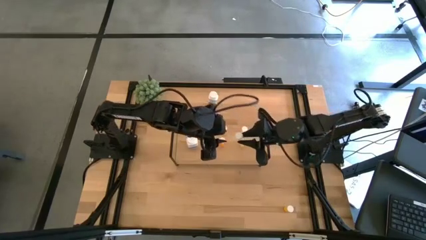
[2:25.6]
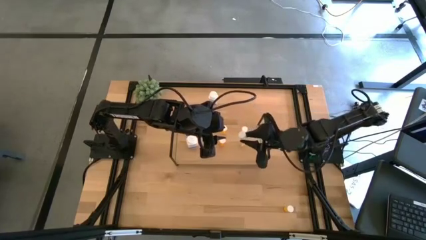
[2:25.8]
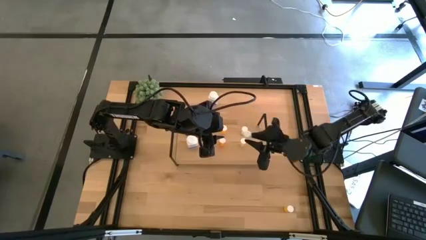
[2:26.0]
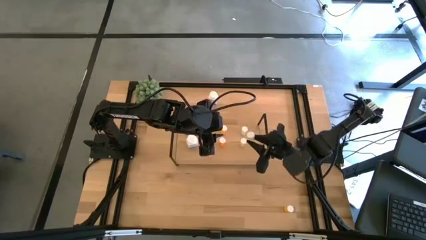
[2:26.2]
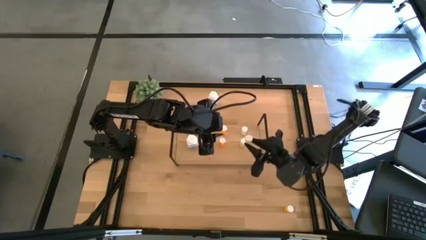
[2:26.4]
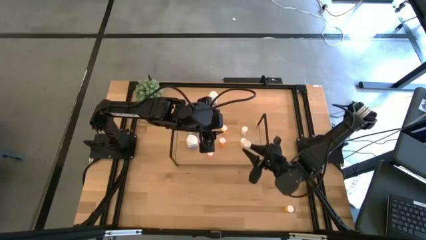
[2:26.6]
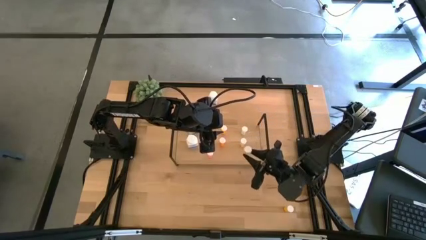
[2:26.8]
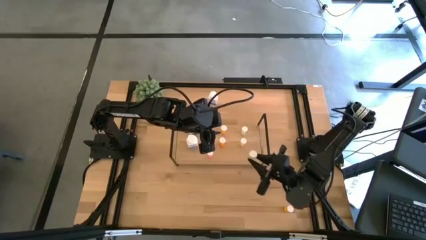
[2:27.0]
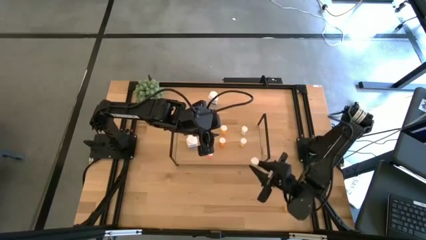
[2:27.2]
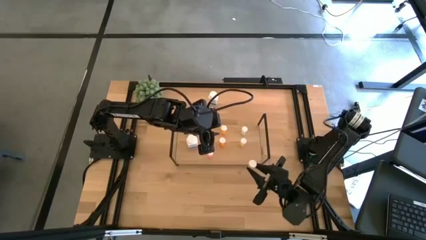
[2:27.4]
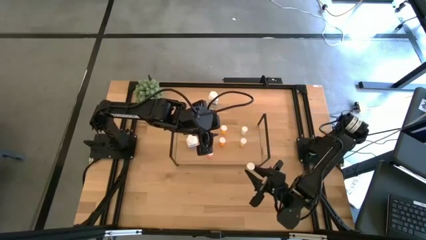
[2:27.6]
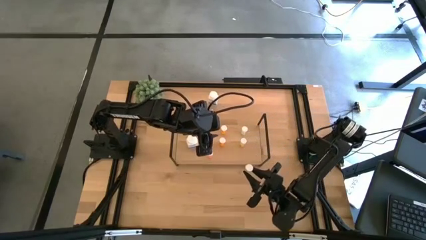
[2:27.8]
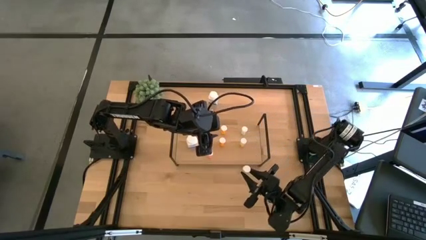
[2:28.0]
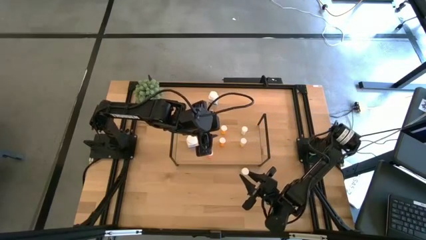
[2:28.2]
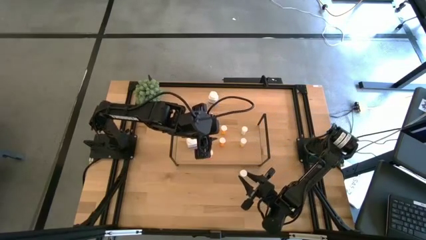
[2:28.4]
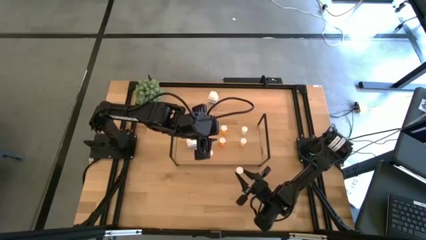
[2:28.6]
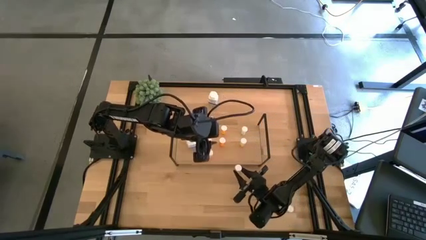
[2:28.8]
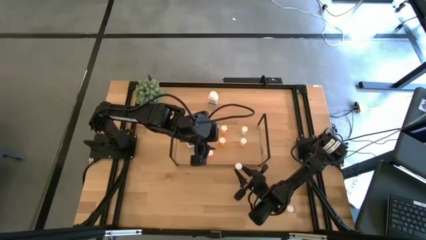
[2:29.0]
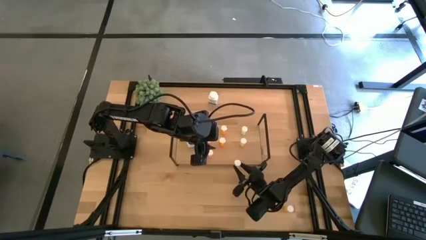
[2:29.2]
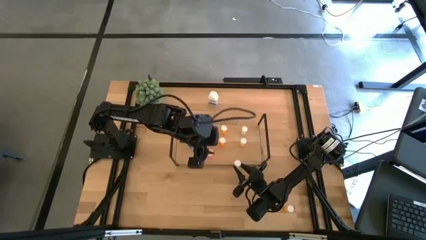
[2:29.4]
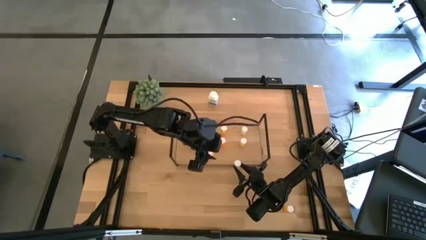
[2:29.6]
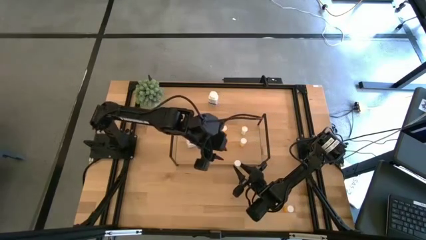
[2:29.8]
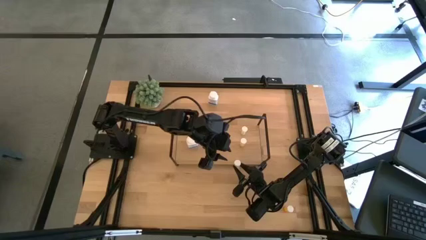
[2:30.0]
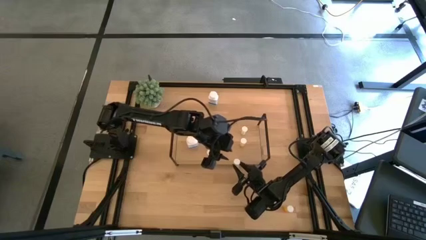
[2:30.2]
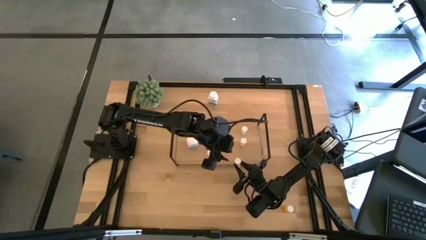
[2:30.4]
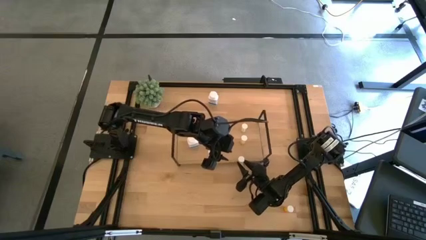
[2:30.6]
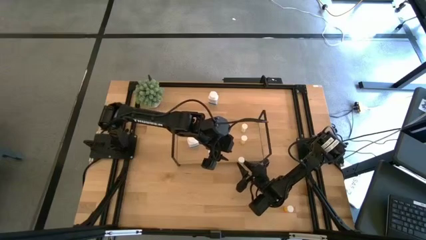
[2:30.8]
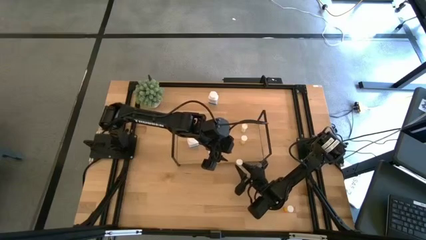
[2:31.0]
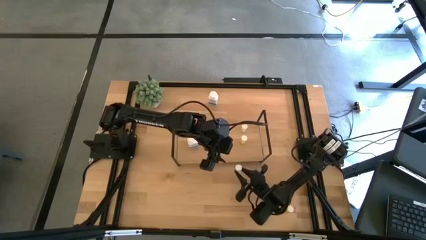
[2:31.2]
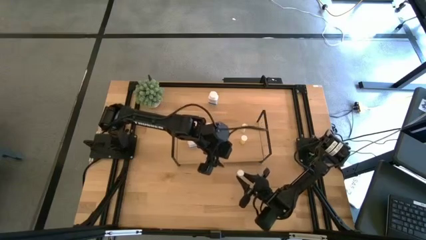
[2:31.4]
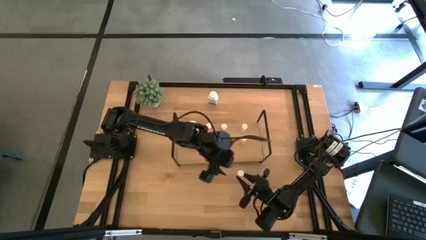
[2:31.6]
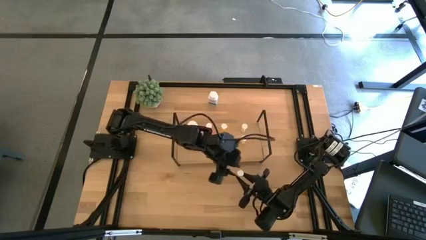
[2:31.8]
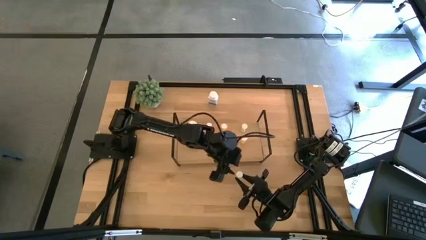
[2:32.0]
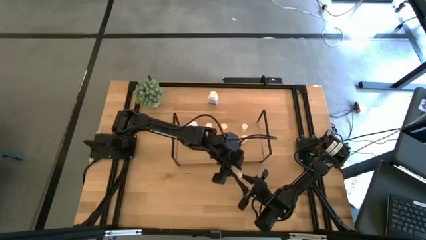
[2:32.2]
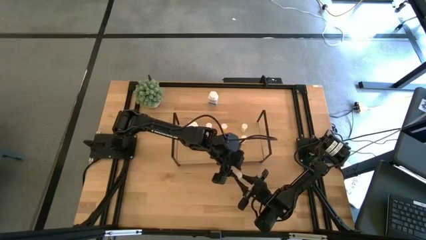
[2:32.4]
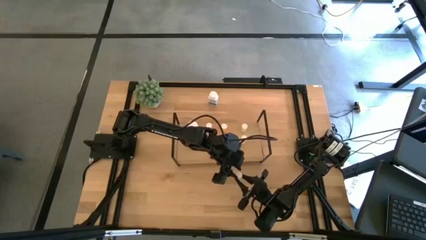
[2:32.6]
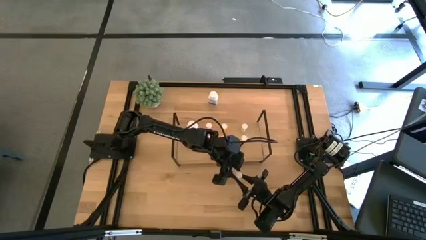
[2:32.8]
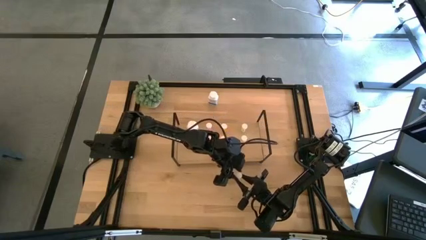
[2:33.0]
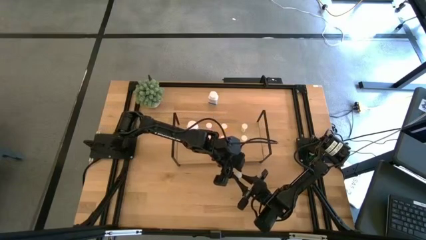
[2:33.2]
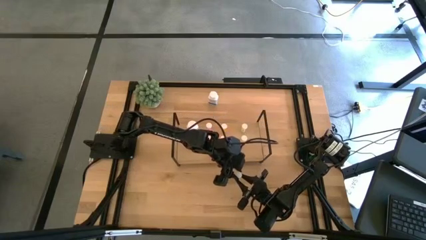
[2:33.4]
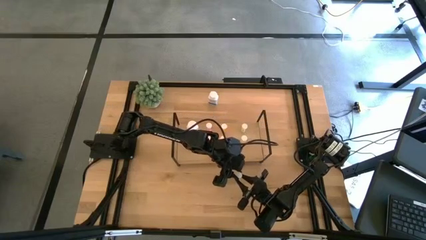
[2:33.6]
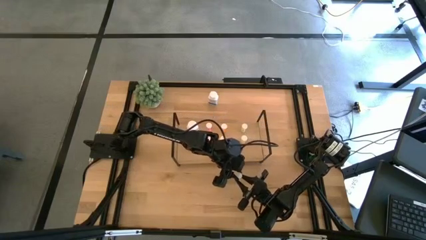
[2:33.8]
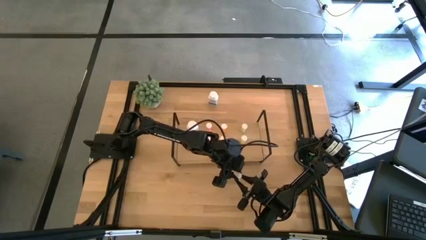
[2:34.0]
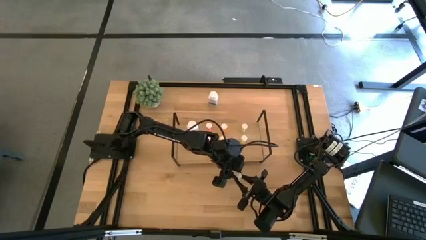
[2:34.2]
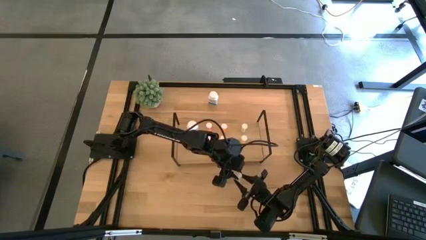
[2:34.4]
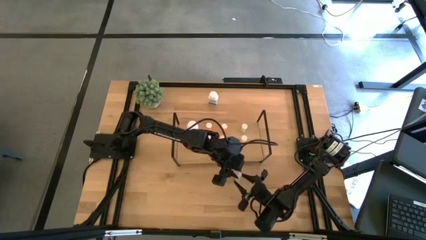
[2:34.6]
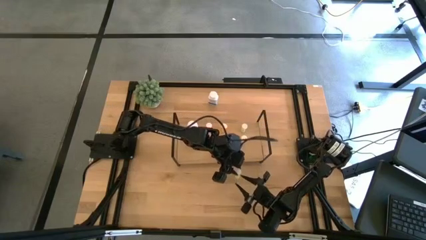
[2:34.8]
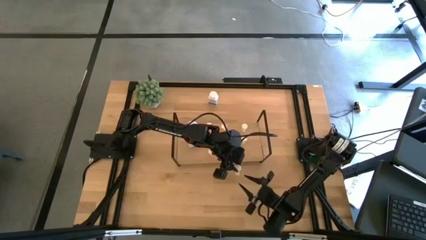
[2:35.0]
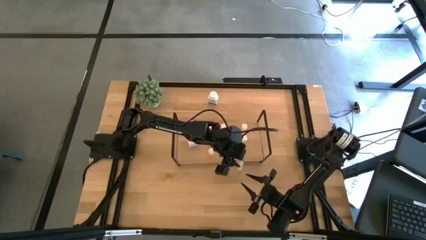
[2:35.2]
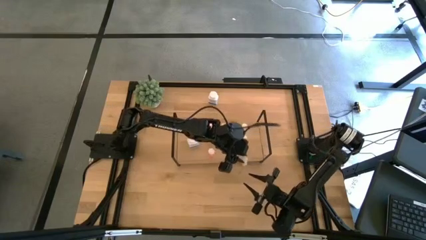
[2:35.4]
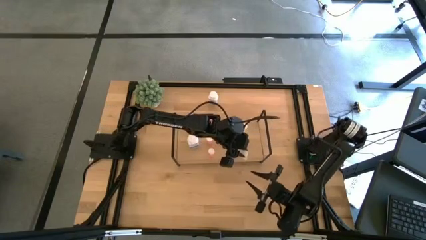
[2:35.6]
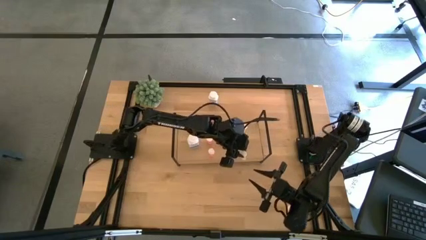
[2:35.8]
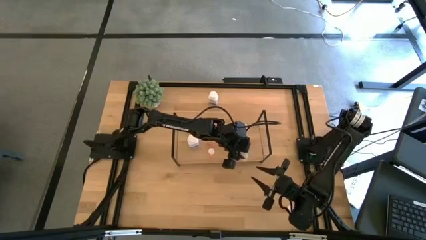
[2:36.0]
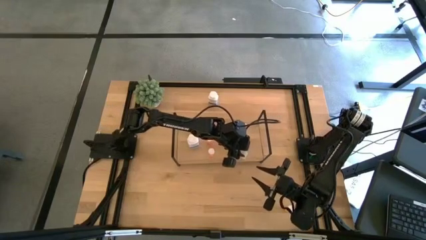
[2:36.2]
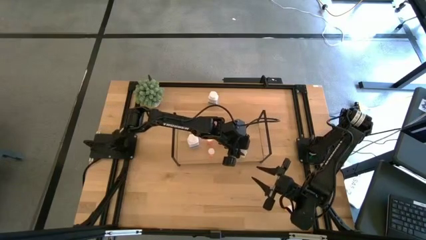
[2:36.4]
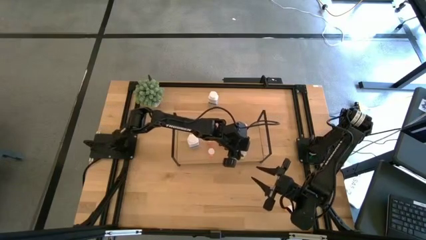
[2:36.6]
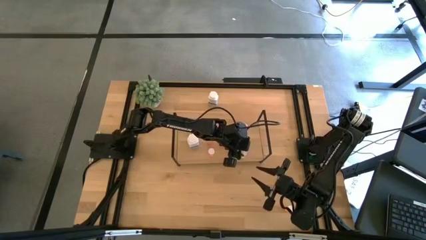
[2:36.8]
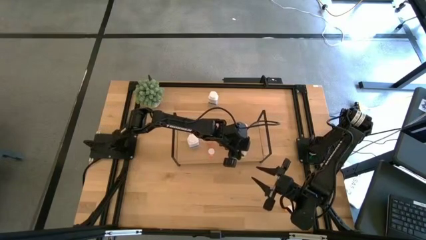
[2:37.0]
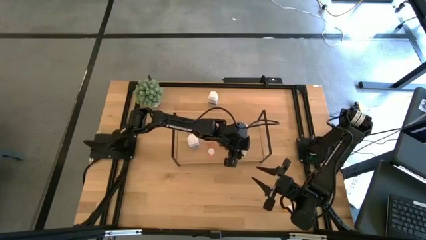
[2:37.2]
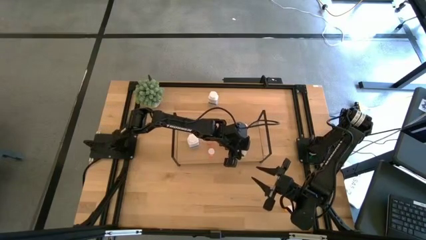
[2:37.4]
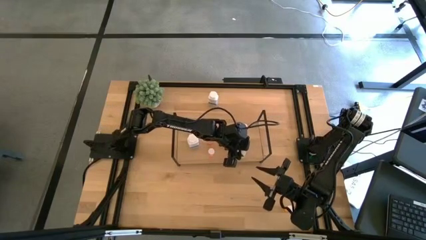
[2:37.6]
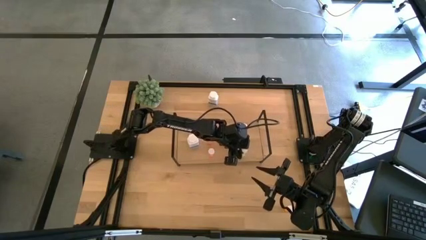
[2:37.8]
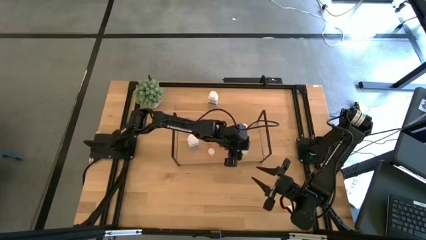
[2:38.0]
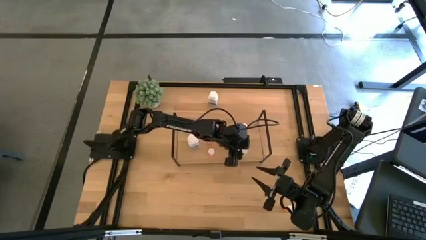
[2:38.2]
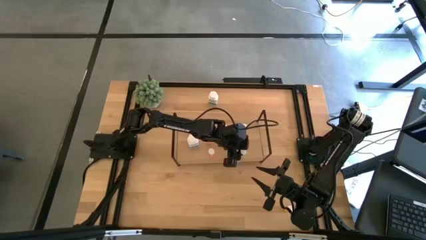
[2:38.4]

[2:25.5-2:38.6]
Task: Pick and place medicine bottles onto shelf by color
Put the yellow pill bottle on the shelf aligned with the other yellow pill bottles

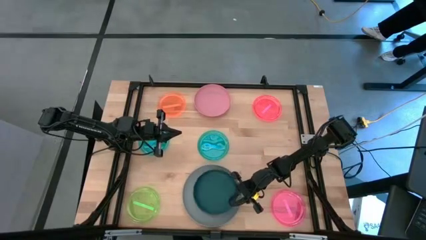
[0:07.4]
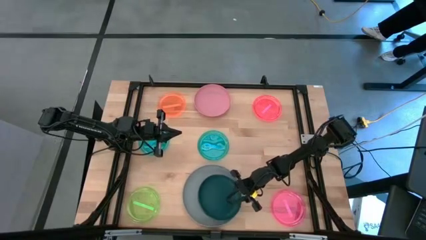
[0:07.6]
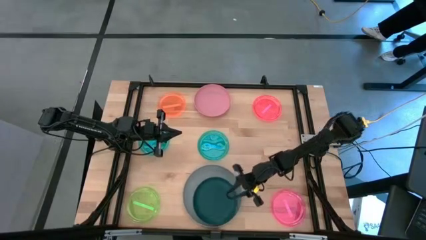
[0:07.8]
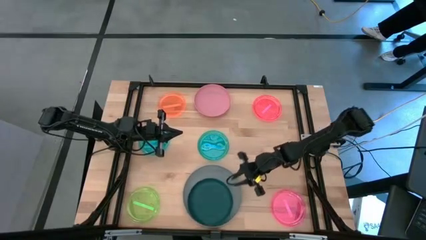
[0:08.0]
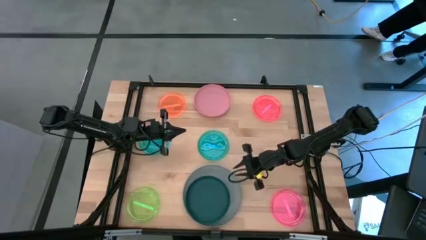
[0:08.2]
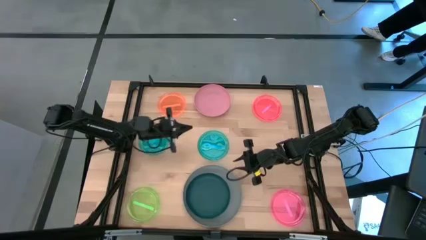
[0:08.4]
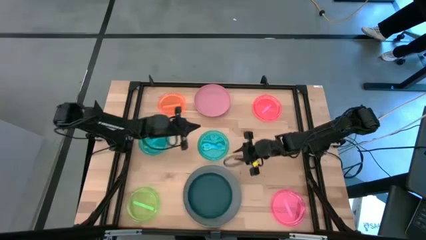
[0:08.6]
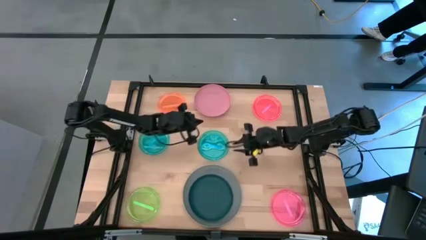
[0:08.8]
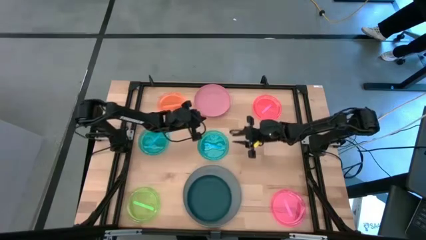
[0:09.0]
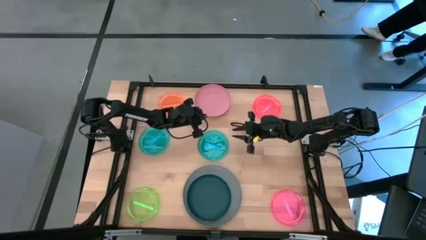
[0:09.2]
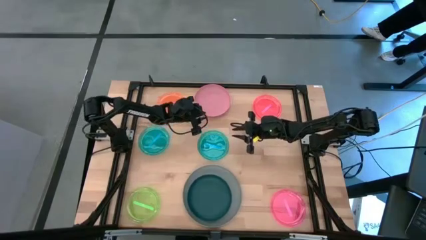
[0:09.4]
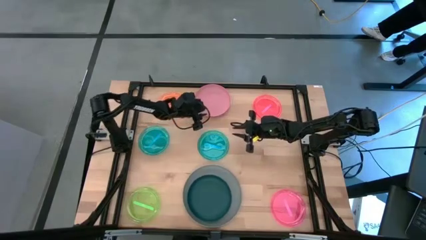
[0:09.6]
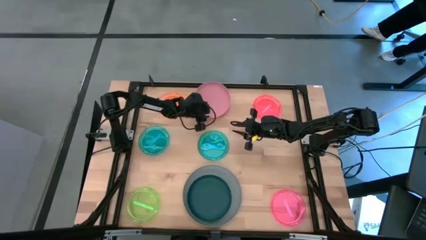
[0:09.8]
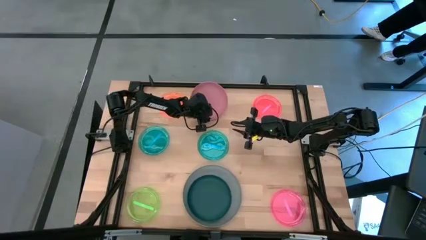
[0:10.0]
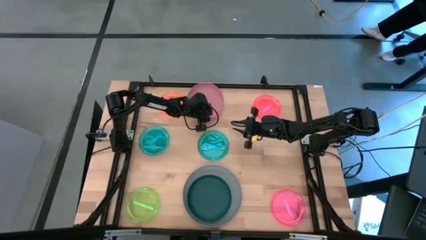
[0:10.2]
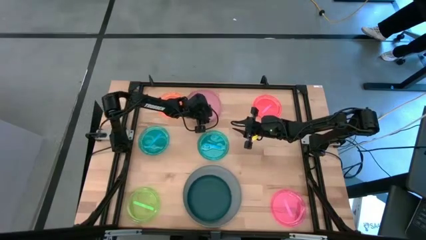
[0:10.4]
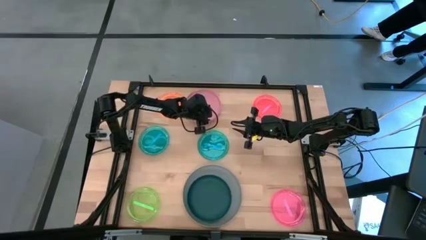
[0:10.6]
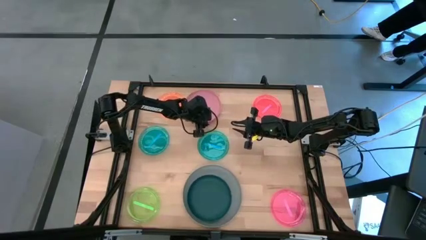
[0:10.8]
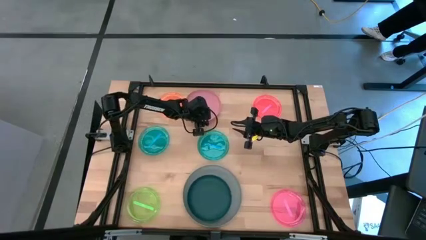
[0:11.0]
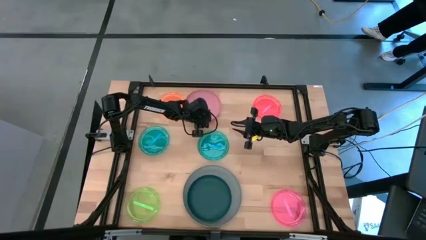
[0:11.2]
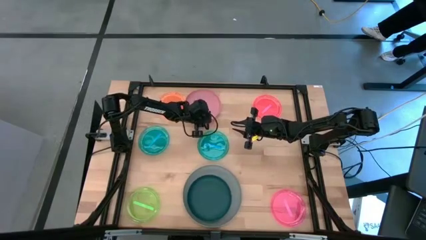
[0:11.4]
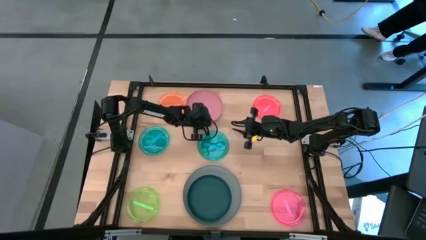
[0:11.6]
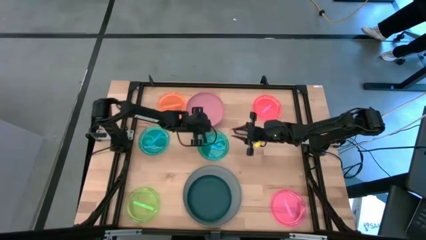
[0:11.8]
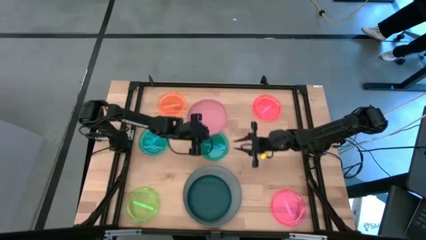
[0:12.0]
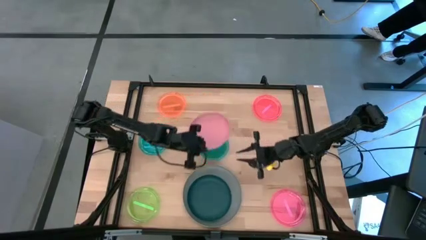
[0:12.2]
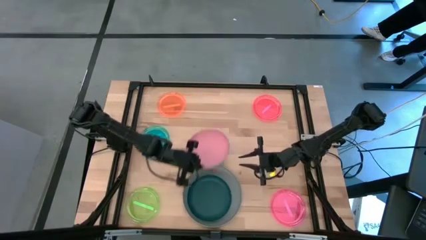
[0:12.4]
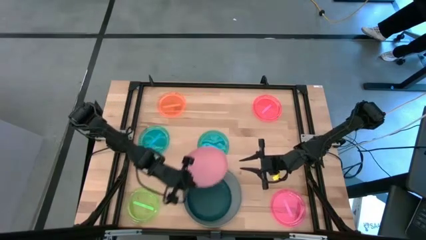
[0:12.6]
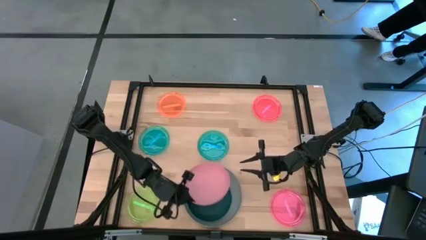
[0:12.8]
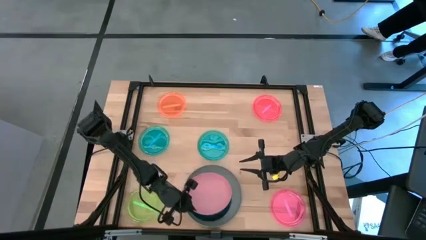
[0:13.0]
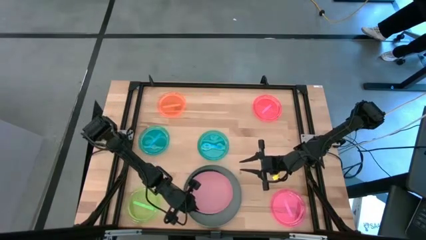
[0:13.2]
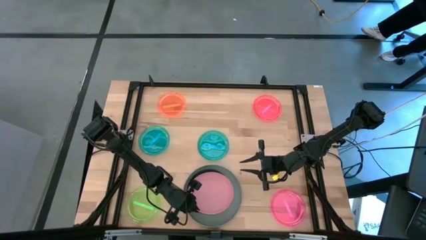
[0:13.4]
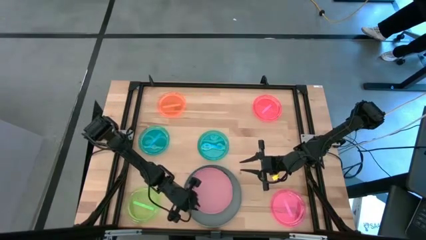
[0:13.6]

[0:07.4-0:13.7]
Task: Stack plastic plates
Stack the light pink plate on top of dark green plate
